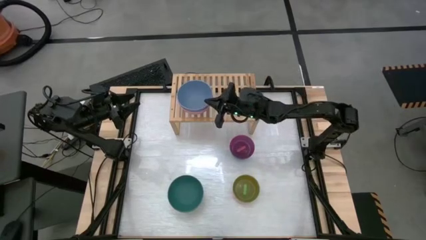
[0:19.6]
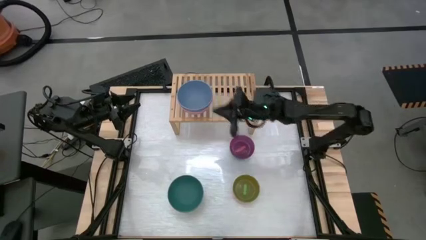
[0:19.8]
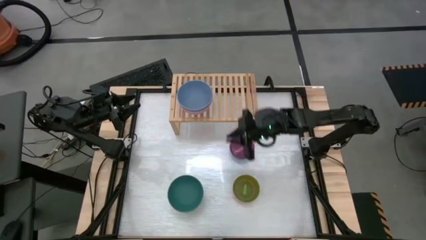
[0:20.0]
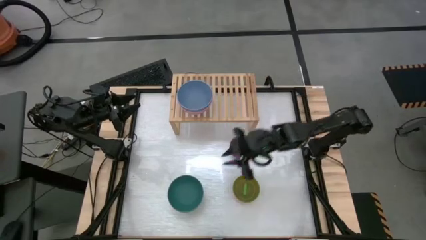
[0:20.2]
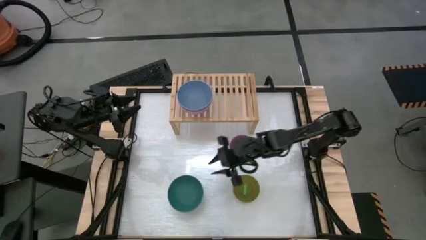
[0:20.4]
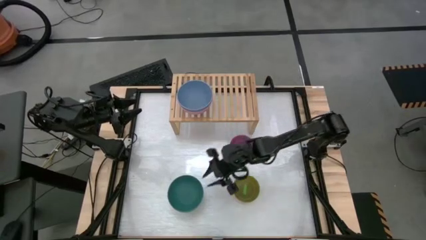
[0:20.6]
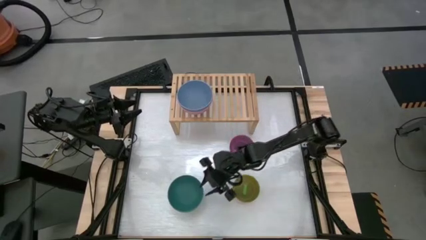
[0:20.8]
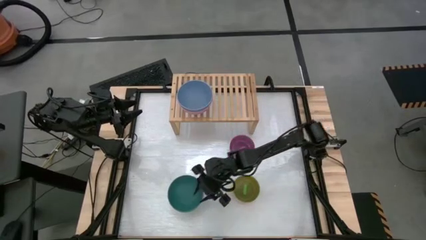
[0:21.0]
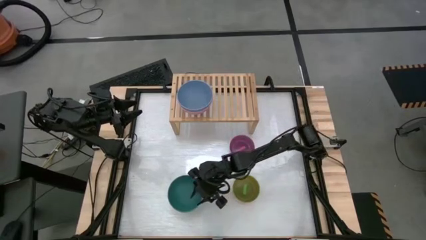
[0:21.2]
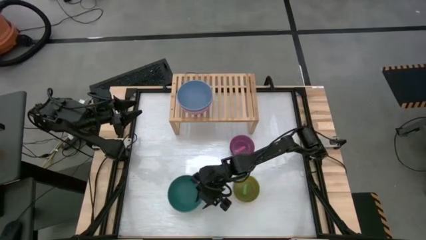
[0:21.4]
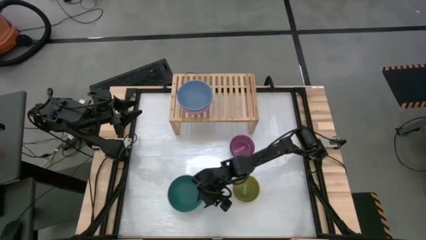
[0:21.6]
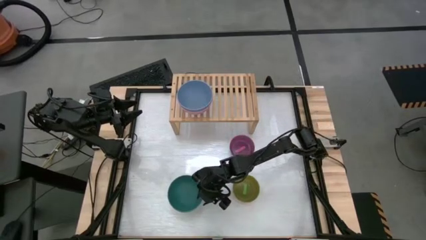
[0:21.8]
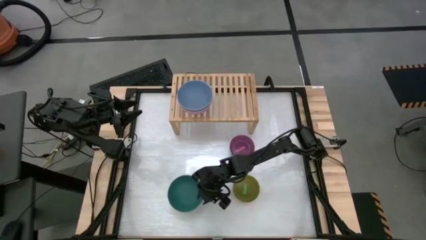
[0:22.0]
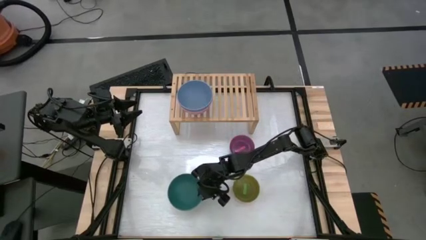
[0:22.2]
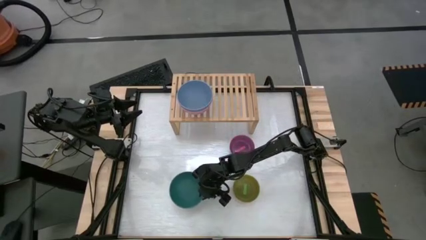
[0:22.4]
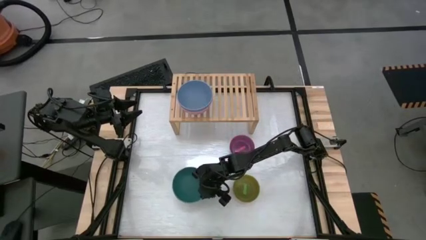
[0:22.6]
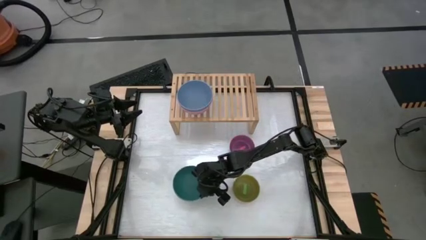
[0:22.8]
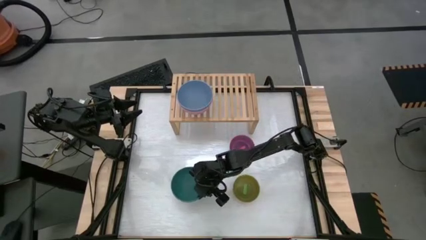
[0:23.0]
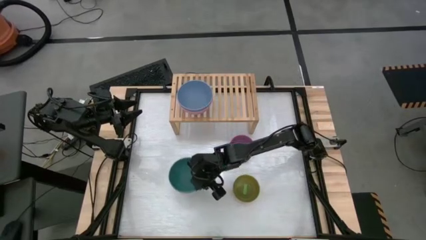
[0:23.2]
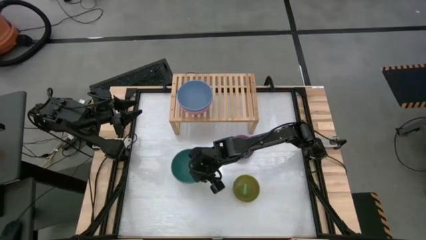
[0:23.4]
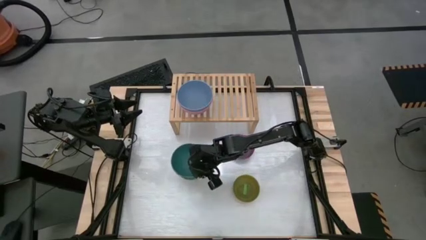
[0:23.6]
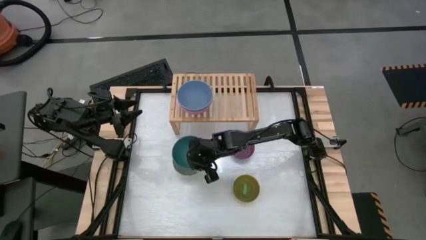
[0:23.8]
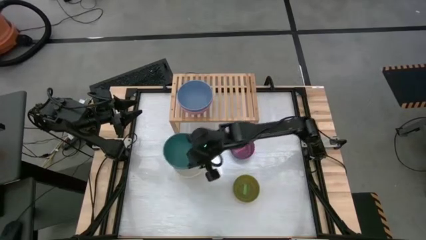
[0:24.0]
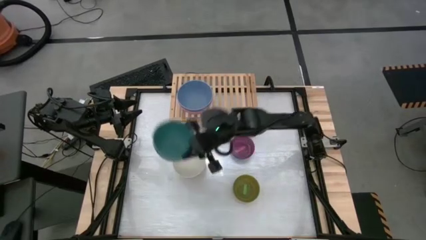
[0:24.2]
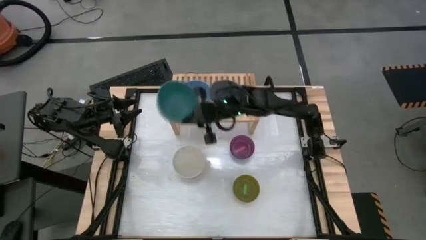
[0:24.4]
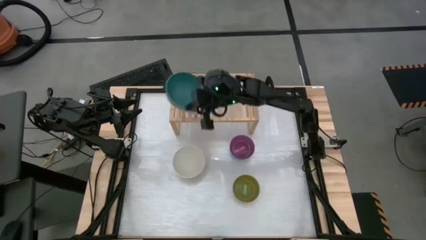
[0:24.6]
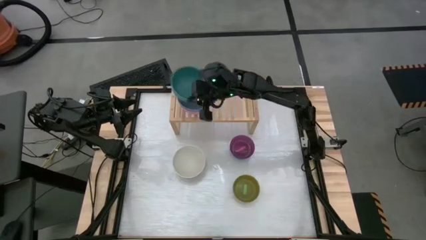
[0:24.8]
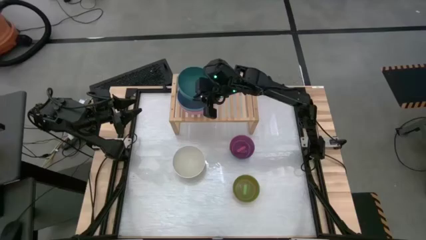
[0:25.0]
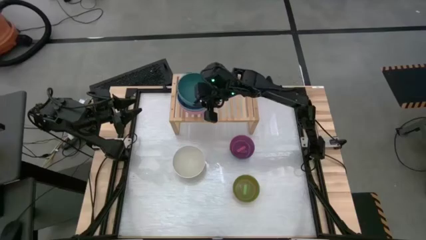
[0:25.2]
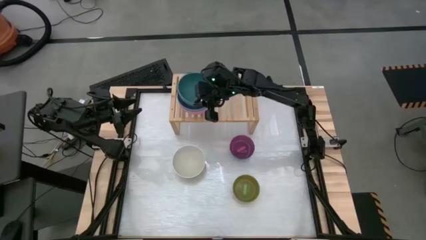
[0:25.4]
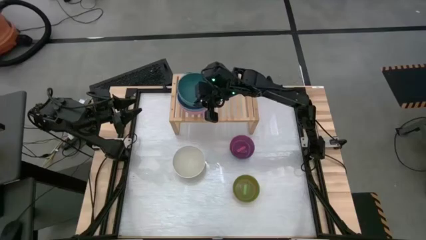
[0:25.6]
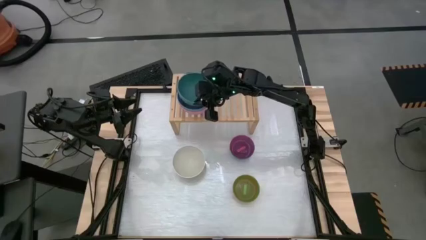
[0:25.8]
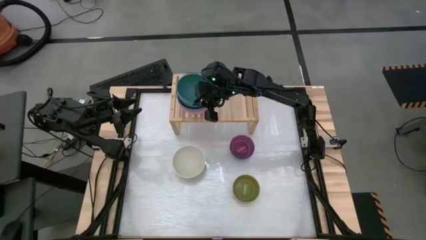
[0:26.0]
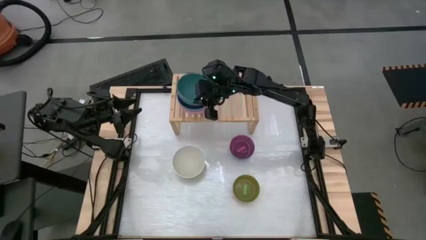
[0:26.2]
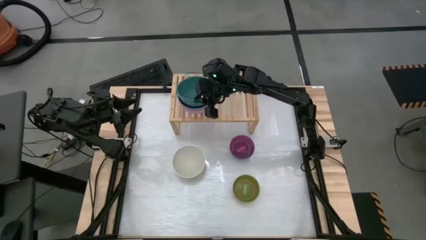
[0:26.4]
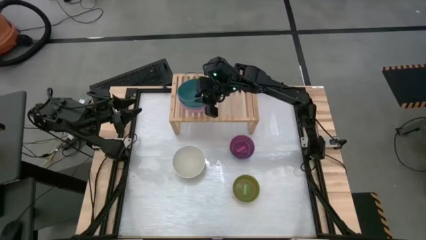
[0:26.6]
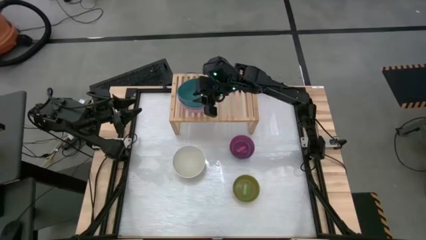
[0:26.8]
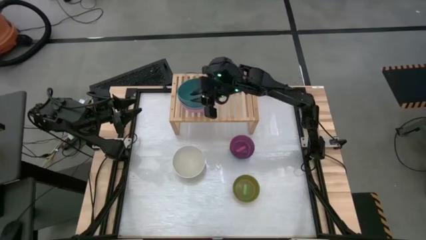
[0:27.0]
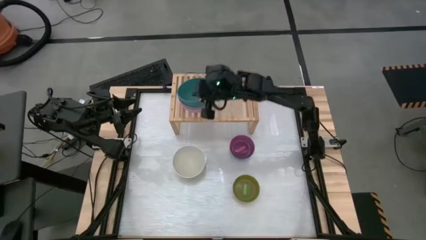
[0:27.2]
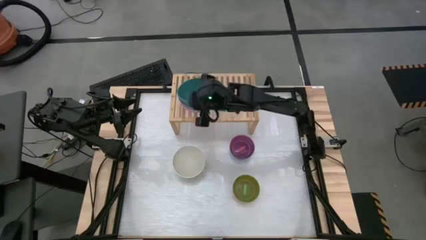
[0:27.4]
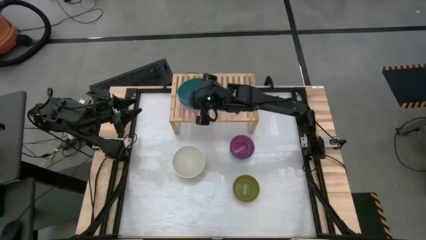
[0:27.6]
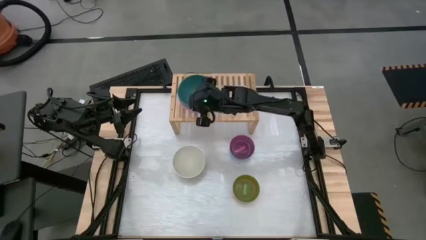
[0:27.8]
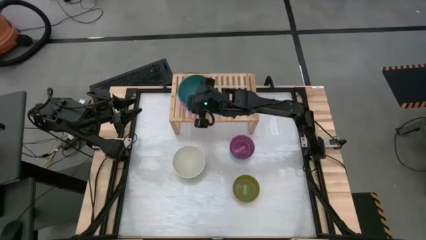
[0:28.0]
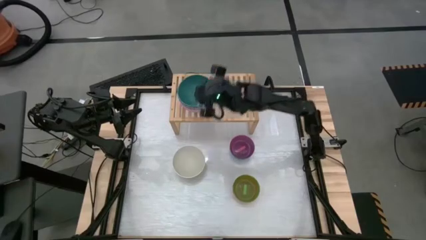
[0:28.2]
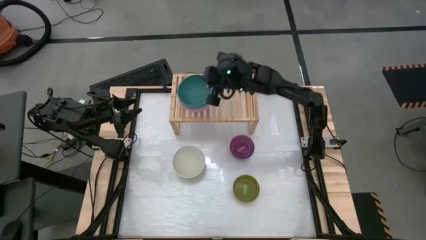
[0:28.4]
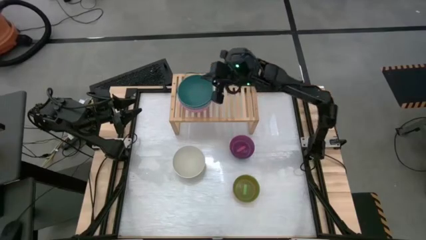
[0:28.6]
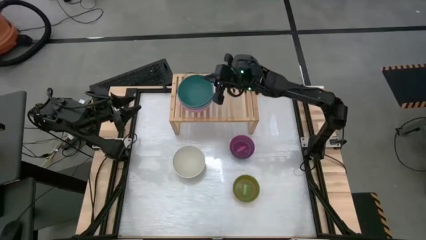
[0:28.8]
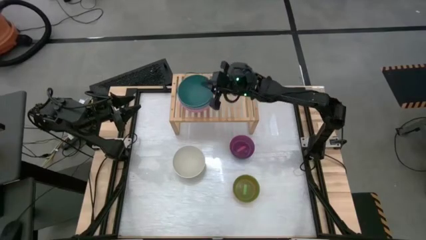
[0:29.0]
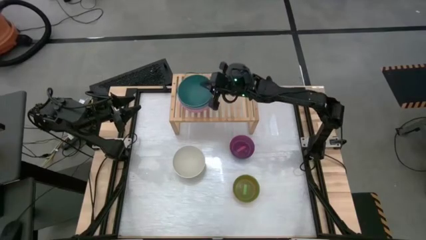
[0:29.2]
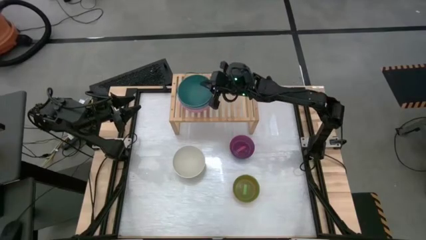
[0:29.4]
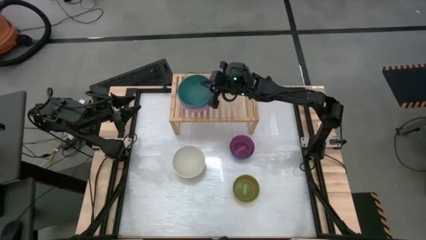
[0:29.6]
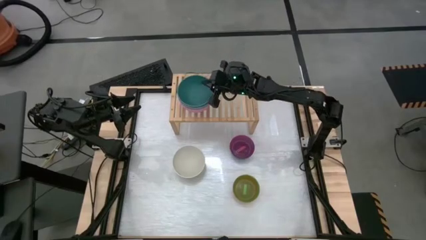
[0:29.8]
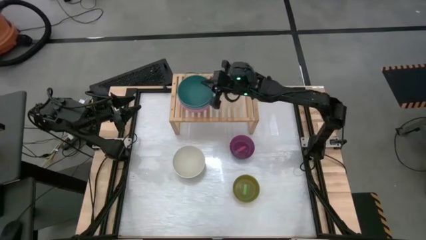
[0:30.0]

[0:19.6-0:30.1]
Task: Place and stack bowls onto a shelf
Stack the dark green bowl on top of the blue bowl on the shelf

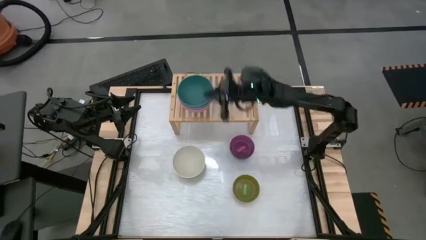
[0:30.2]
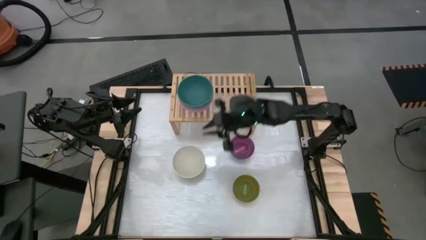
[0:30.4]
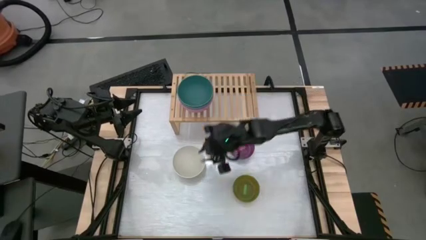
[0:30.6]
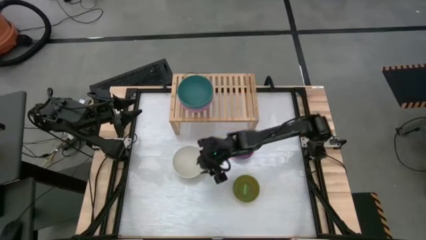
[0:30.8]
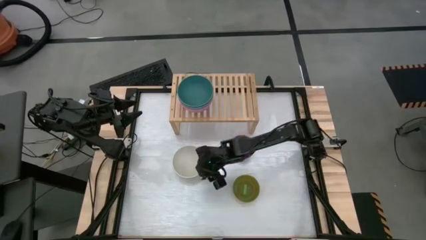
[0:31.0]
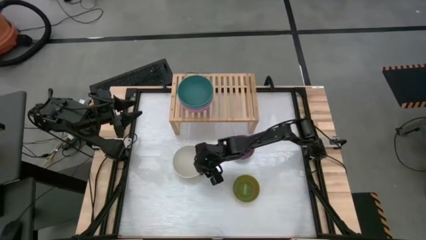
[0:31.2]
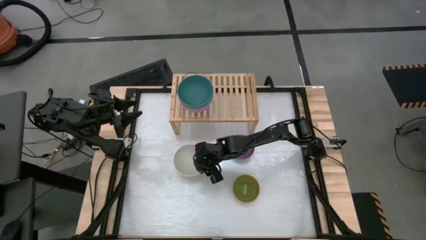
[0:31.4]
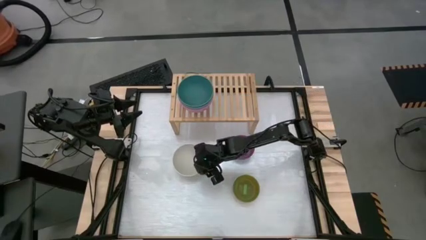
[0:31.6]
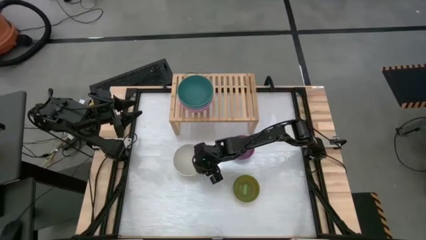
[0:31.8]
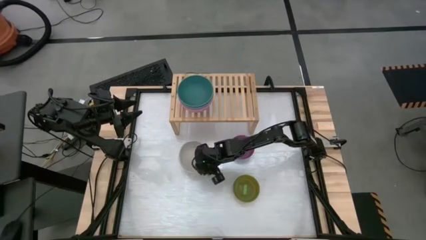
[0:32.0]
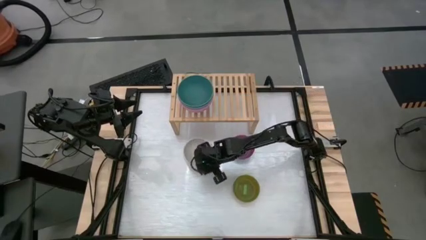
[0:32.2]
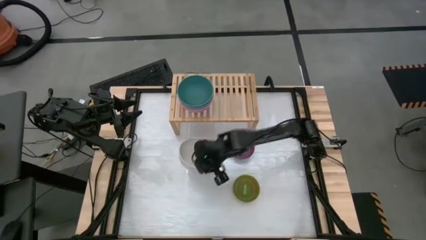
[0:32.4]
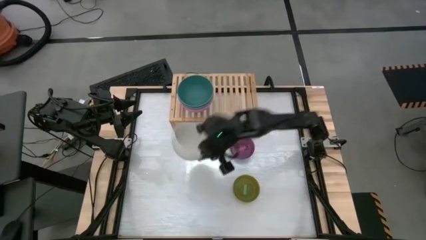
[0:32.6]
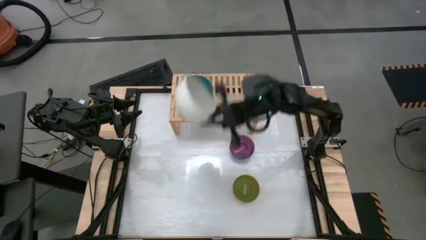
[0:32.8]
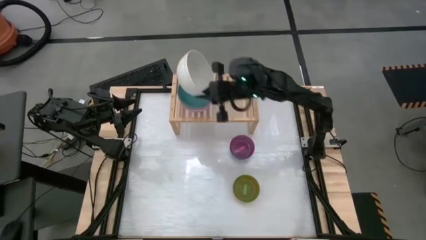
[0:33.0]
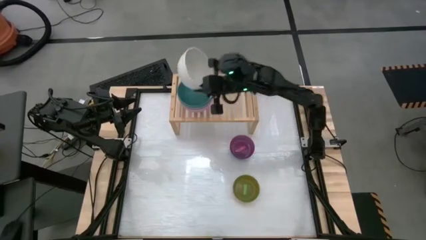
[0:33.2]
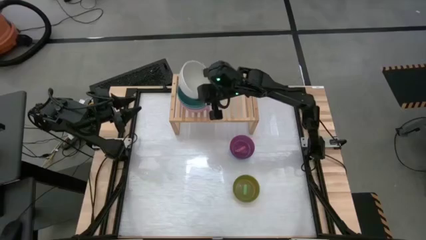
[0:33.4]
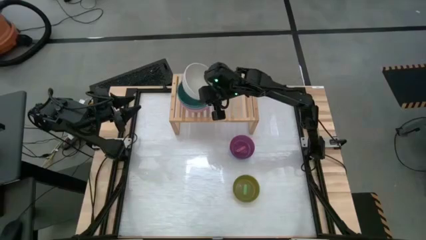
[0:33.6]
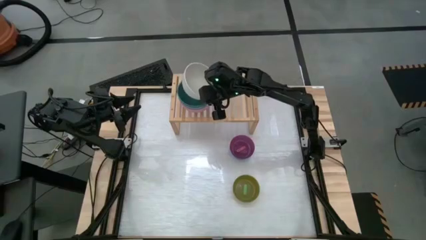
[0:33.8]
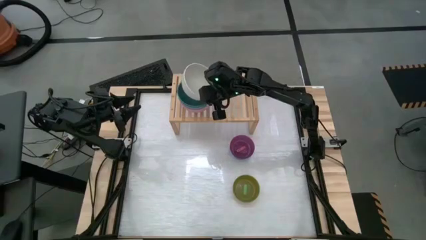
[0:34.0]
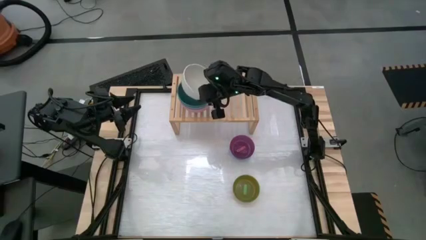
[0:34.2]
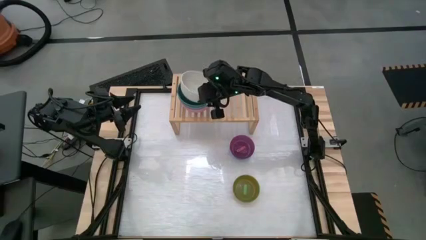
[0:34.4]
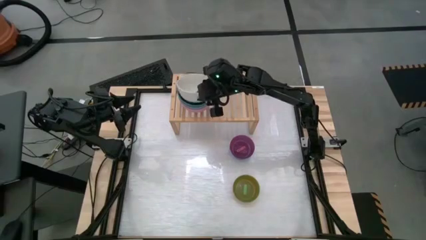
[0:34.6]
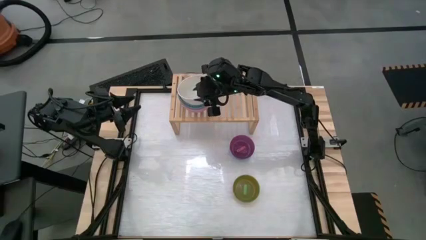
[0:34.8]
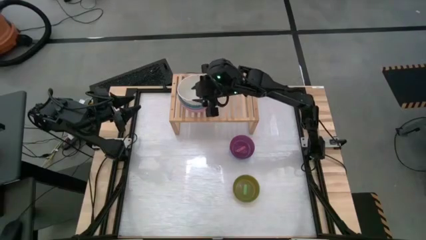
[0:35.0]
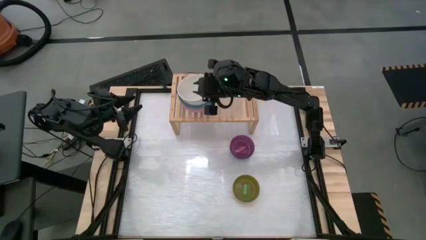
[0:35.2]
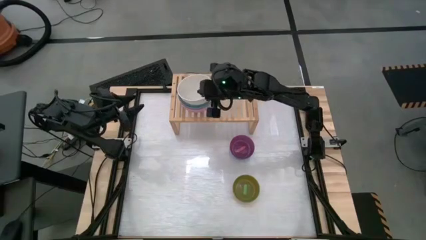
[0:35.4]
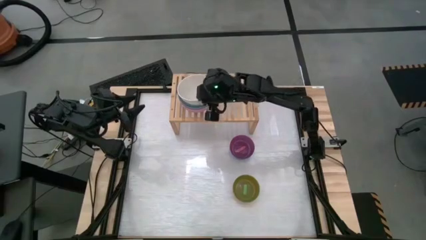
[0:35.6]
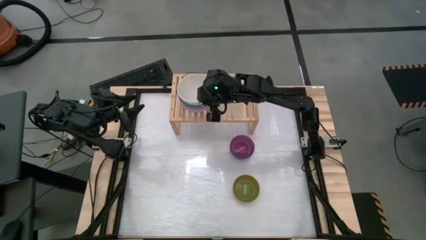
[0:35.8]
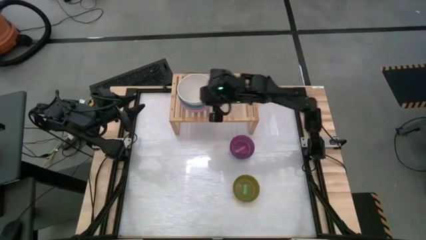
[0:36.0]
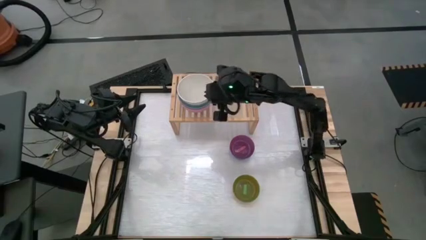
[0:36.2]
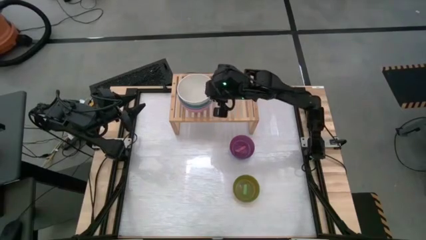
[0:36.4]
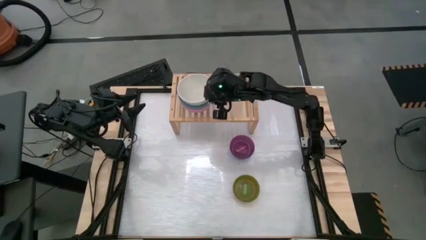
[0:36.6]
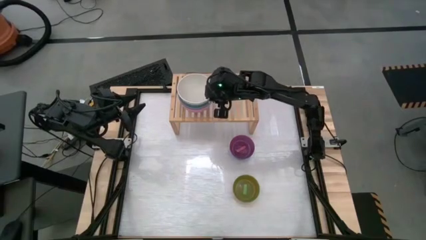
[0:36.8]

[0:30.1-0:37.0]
Stack the white bowl on top of the dark green bowl on the shelf
